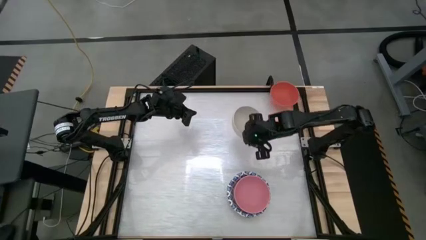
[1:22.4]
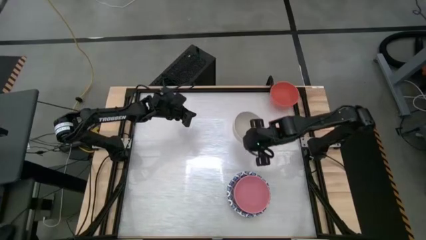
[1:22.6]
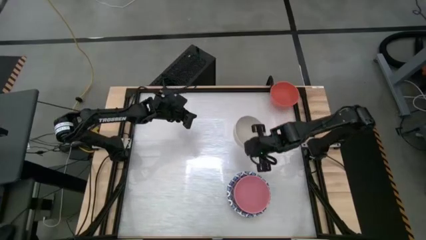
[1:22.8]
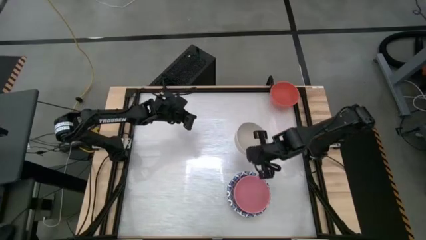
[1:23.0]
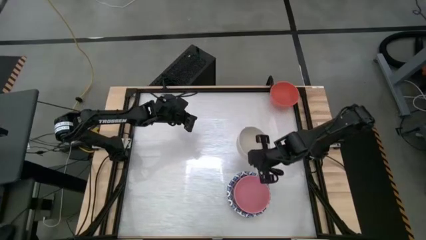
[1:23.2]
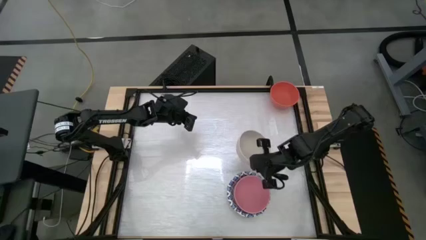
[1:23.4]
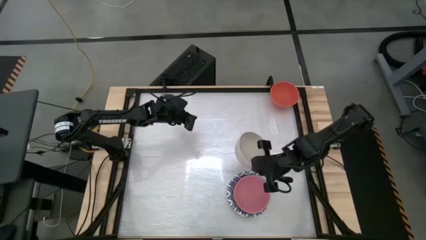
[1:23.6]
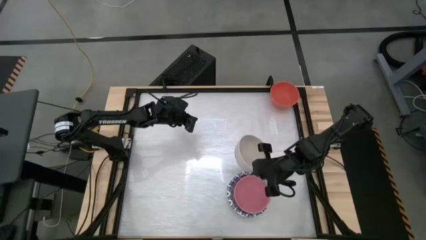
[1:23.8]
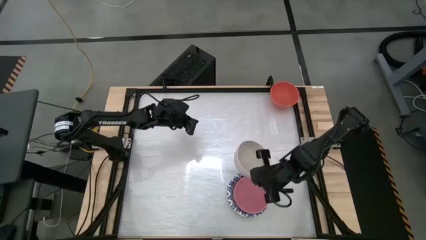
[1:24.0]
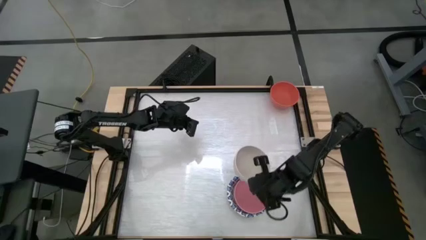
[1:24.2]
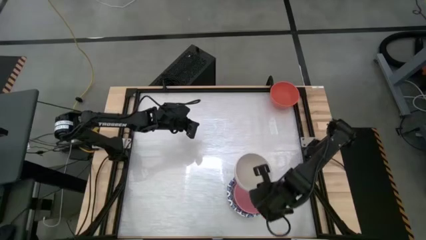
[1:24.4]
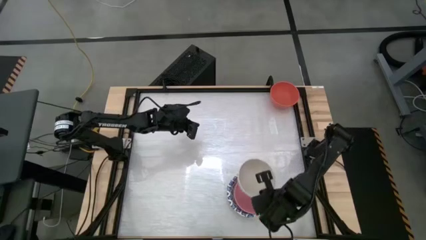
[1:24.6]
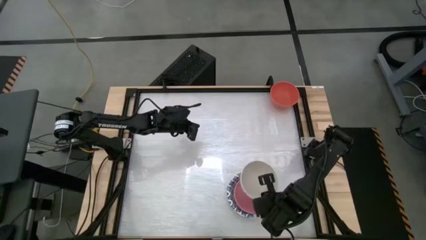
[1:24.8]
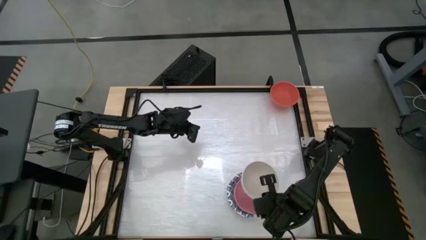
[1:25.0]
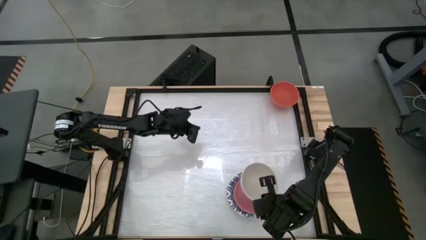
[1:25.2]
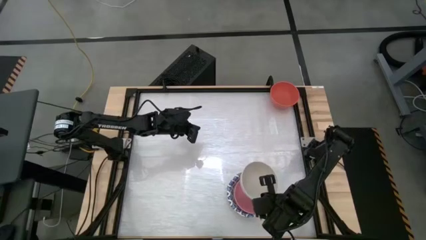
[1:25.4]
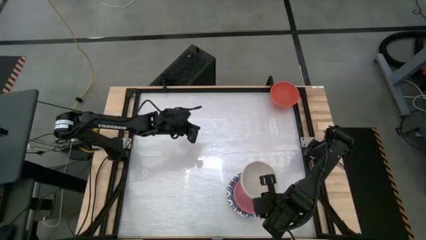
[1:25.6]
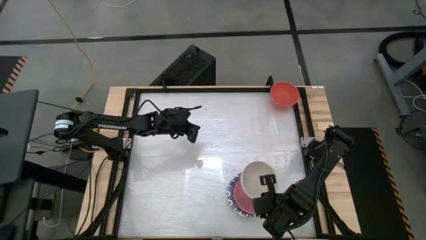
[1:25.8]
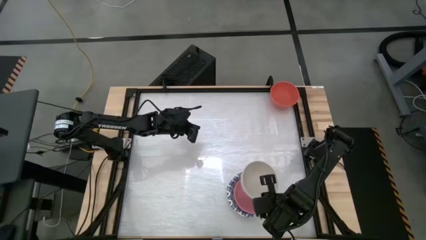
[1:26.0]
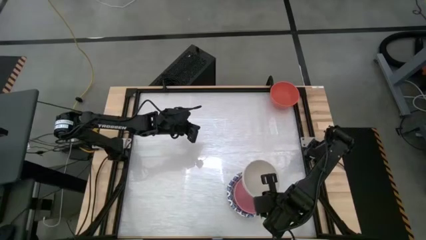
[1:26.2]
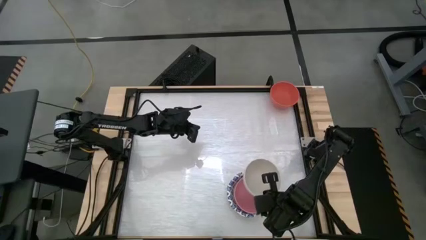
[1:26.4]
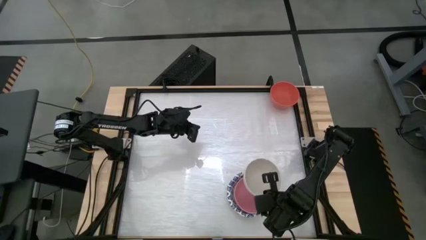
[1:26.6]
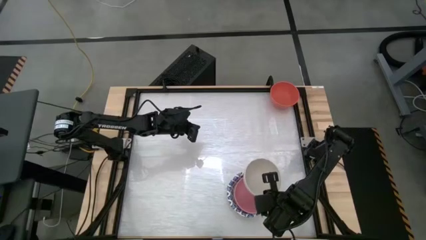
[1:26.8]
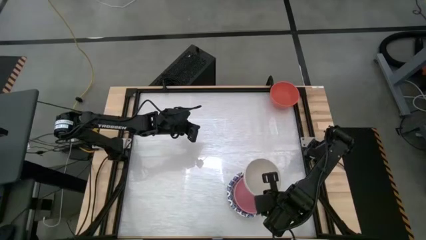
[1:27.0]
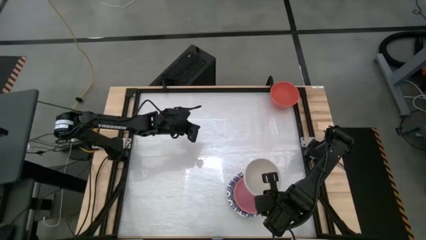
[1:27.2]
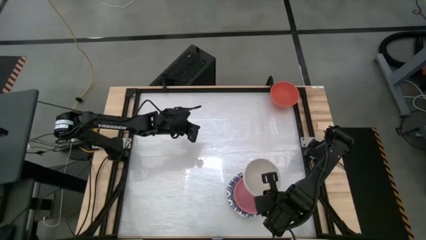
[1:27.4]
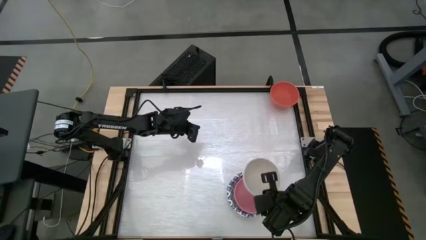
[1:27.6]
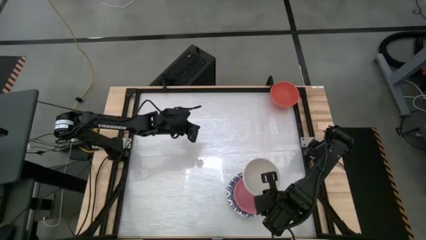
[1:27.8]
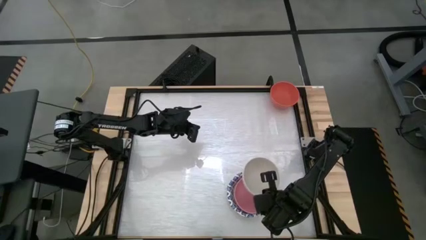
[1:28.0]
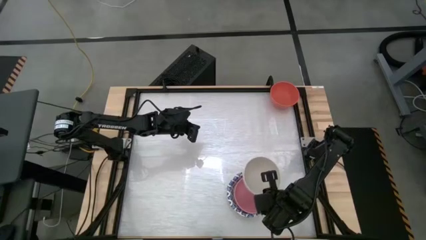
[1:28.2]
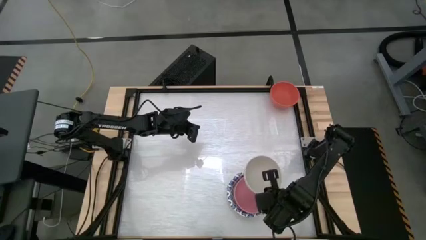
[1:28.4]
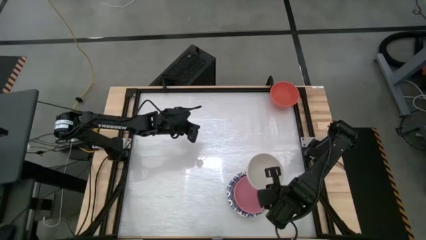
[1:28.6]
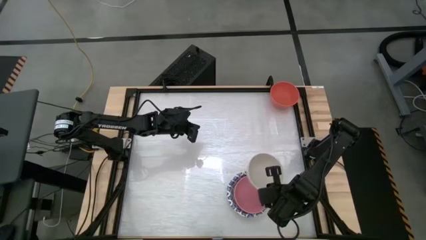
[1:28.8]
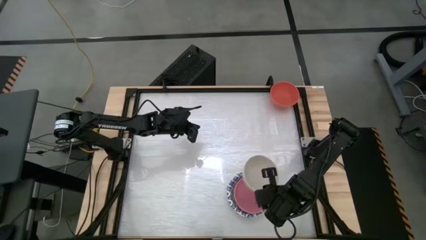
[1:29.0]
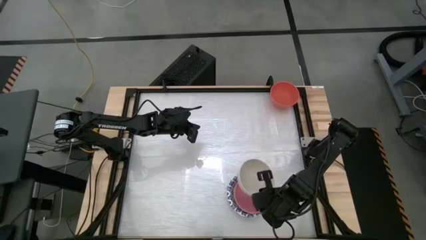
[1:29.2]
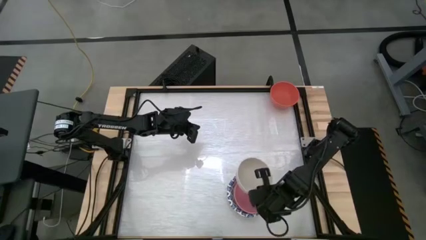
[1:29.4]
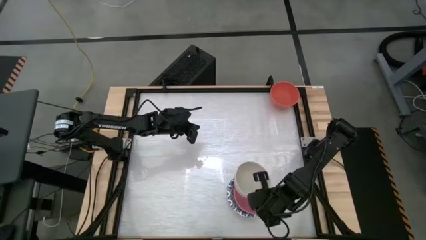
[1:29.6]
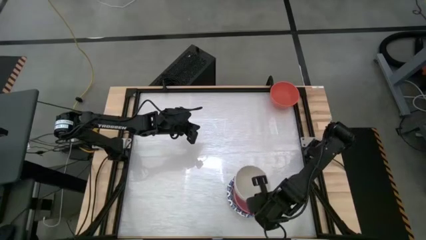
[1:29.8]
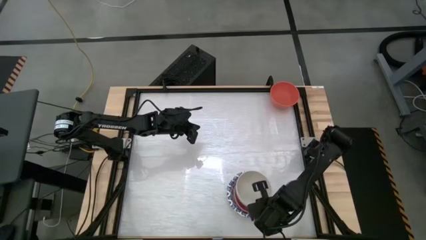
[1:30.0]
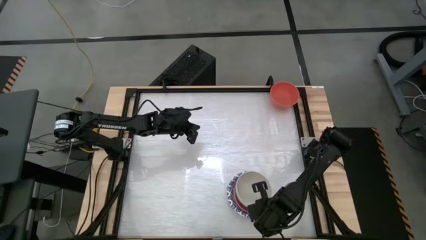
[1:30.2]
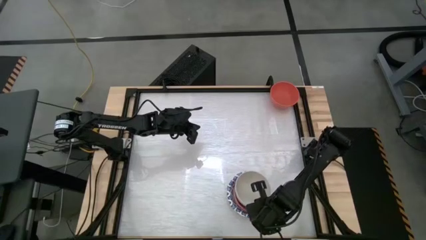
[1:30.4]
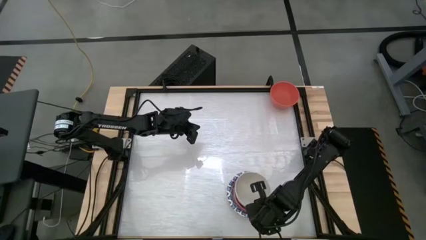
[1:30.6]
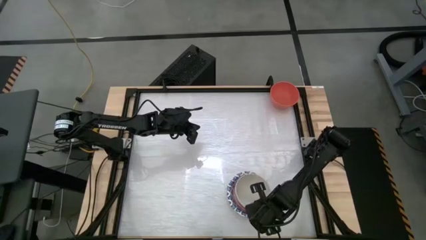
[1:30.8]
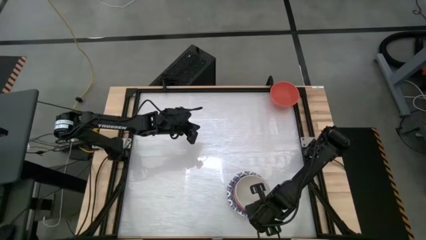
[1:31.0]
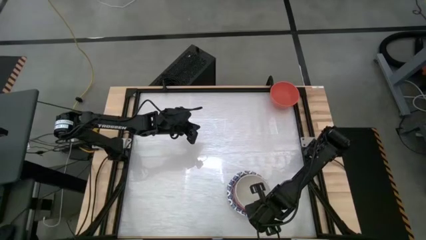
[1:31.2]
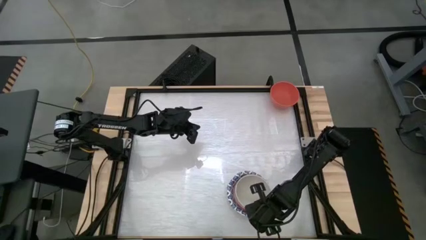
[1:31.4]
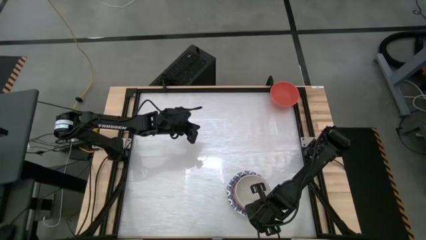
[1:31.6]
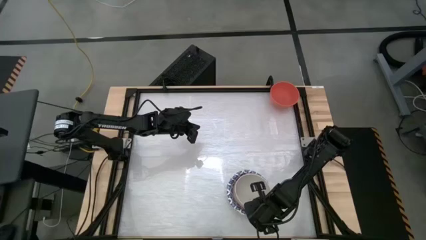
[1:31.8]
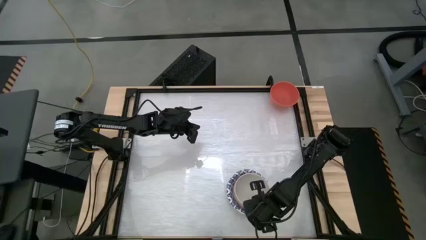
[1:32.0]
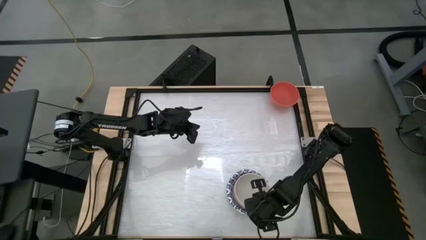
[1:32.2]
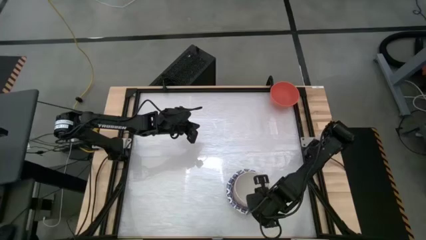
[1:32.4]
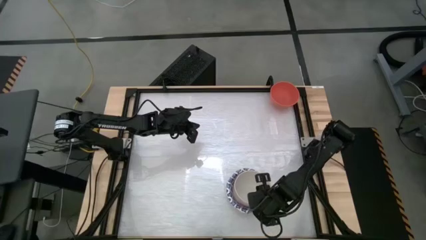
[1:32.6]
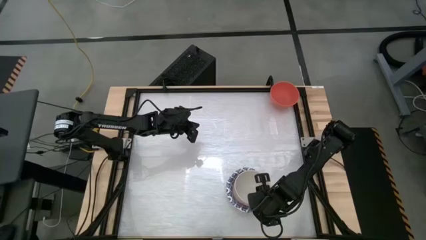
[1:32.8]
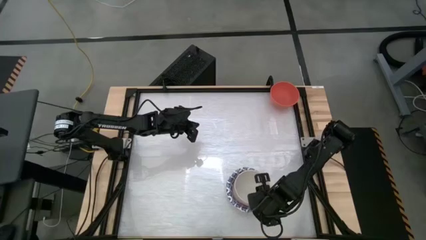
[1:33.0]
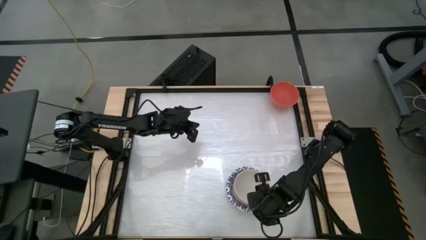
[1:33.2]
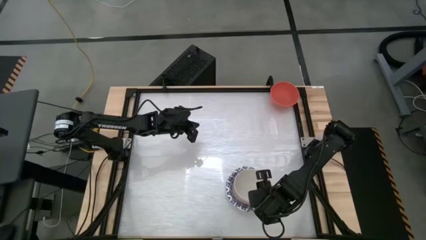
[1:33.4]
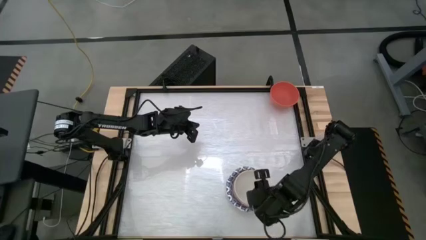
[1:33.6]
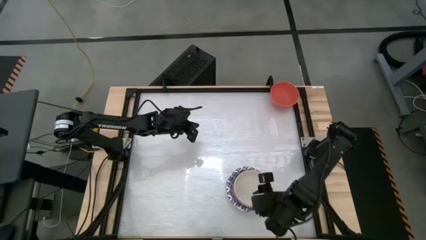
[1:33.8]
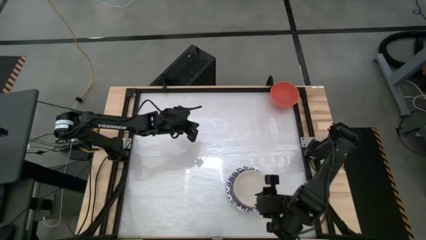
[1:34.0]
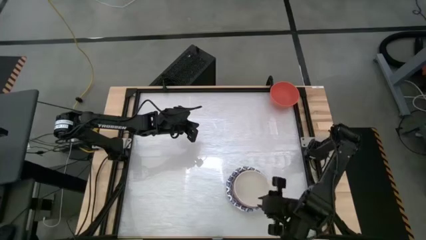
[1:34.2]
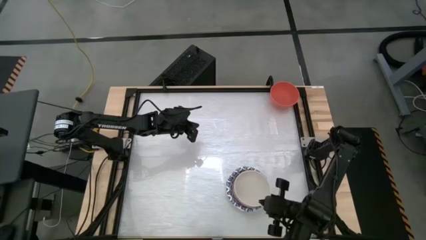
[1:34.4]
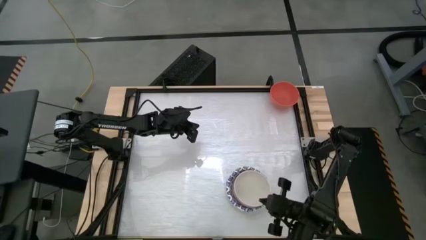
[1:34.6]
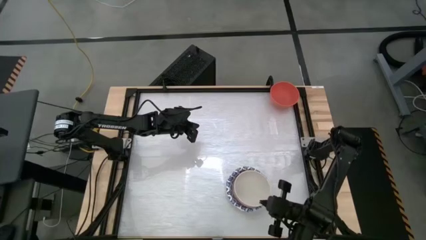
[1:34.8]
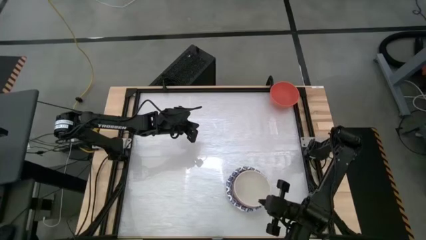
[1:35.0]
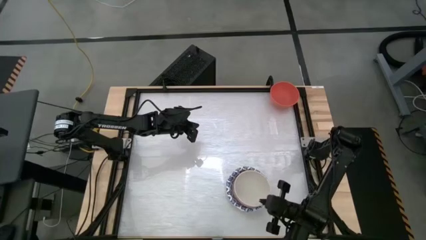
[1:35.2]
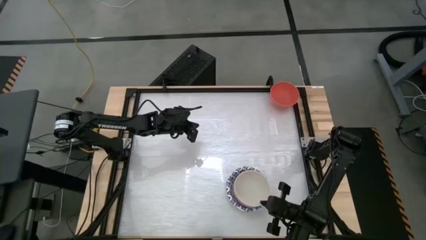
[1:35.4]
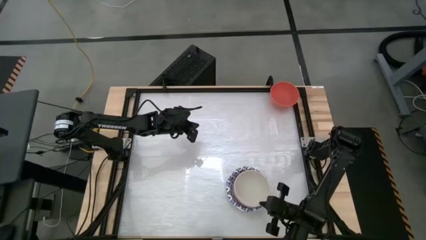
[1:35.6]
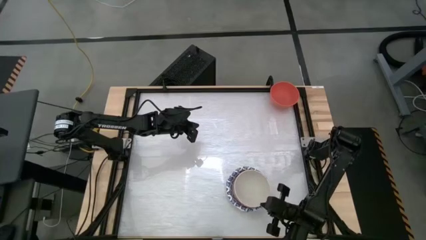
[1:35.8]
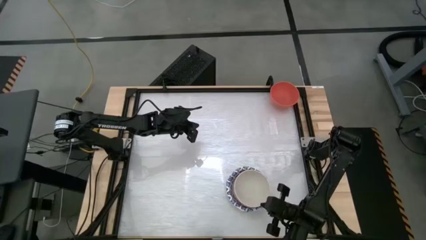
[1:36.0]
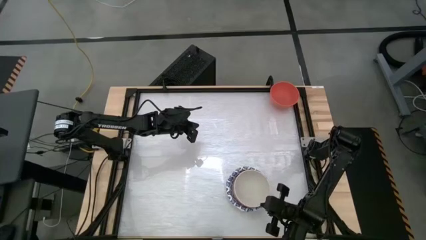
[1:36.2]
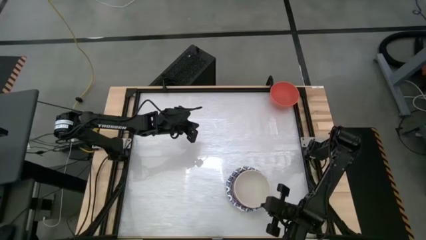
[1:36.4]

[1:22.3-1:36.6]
Stack the white bowl on top of the pink bowl
